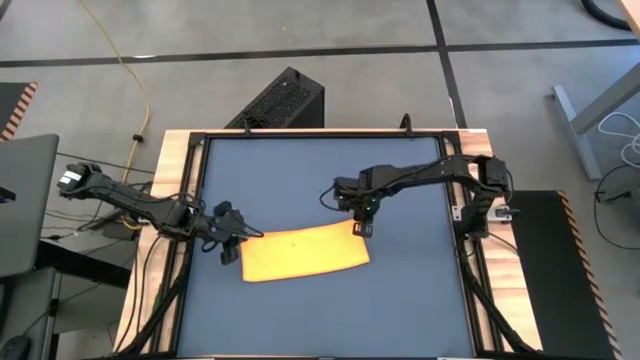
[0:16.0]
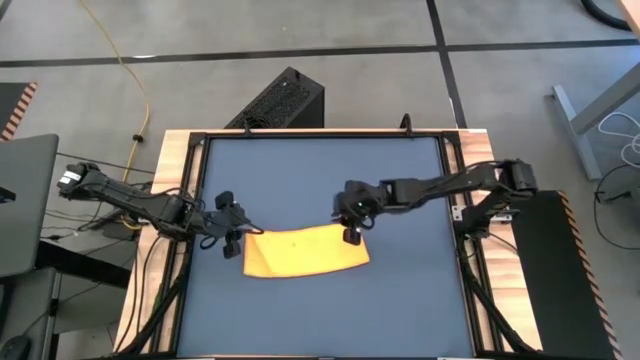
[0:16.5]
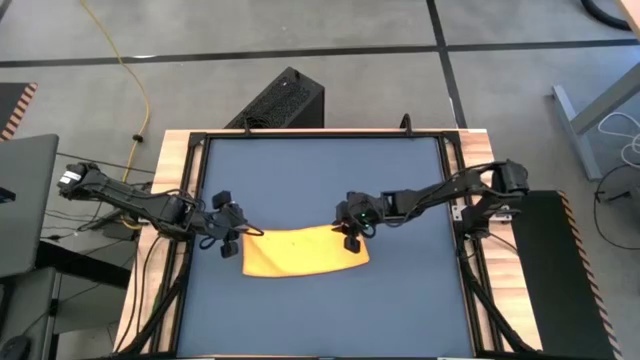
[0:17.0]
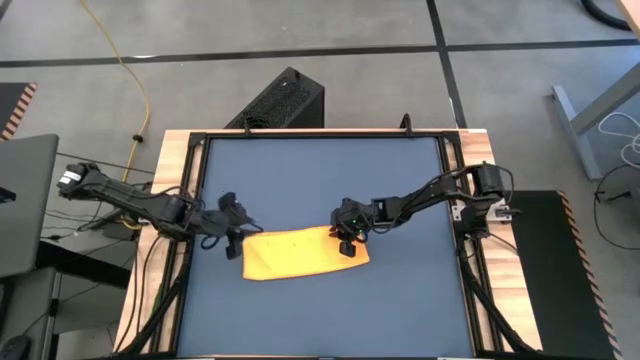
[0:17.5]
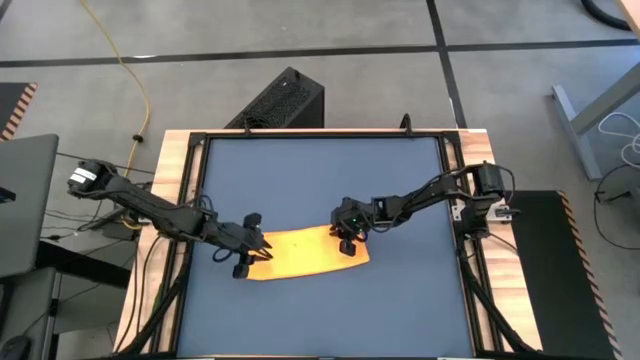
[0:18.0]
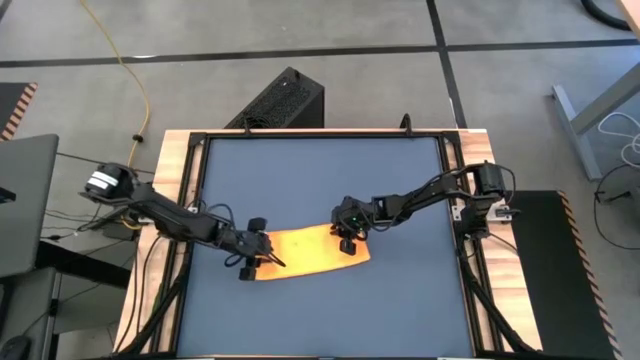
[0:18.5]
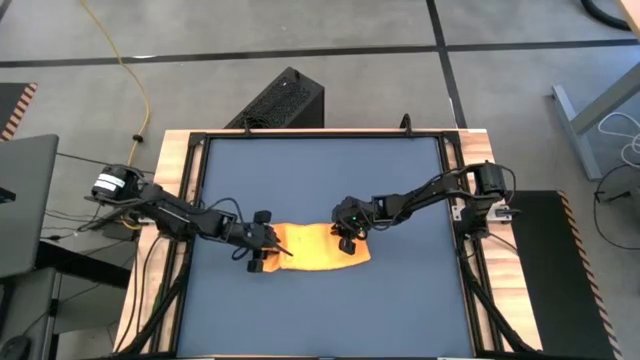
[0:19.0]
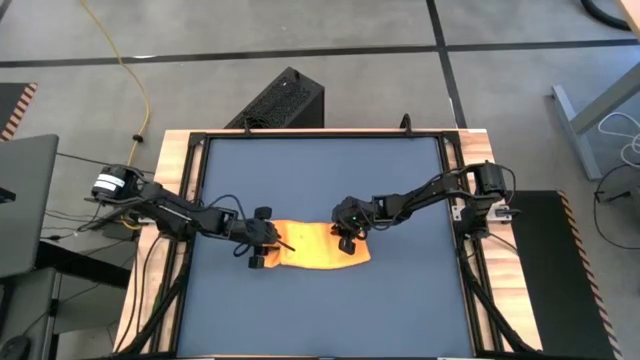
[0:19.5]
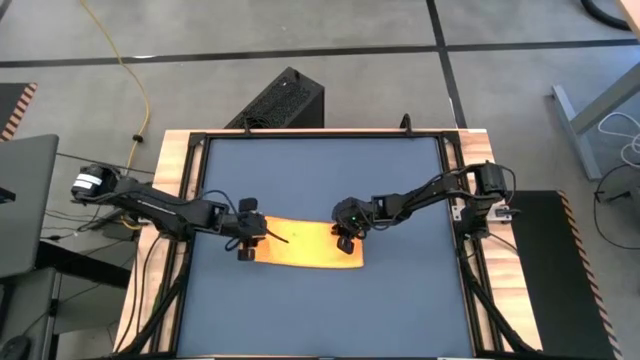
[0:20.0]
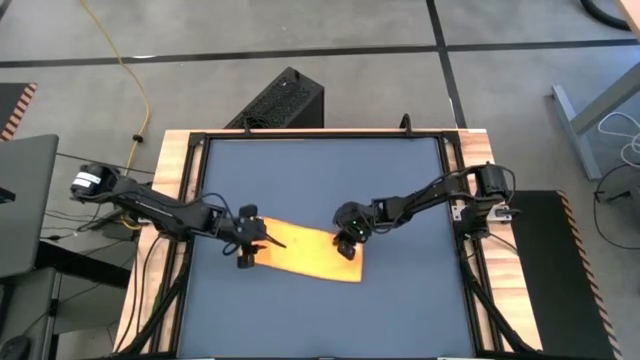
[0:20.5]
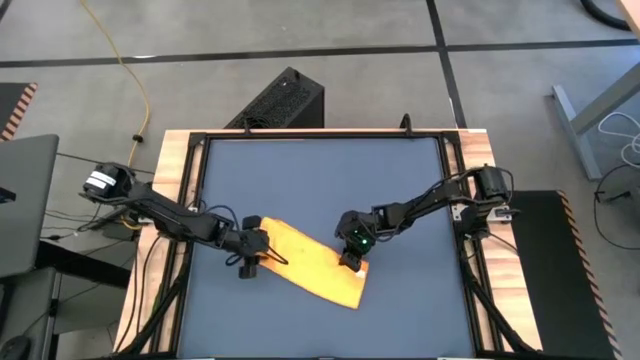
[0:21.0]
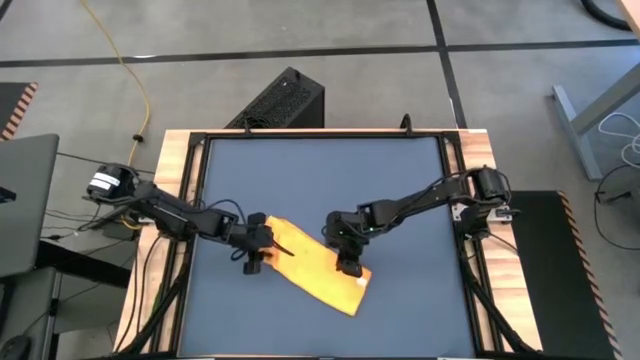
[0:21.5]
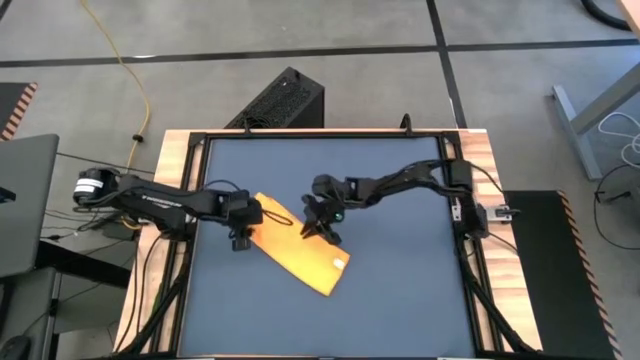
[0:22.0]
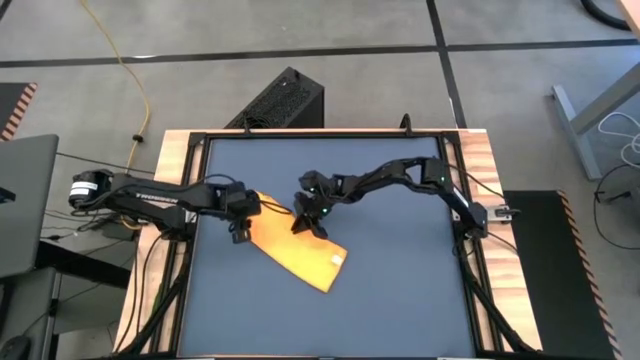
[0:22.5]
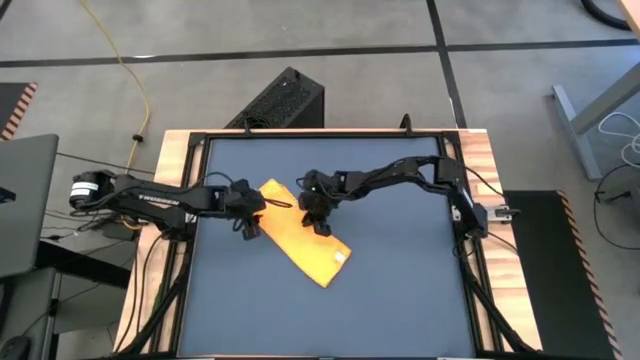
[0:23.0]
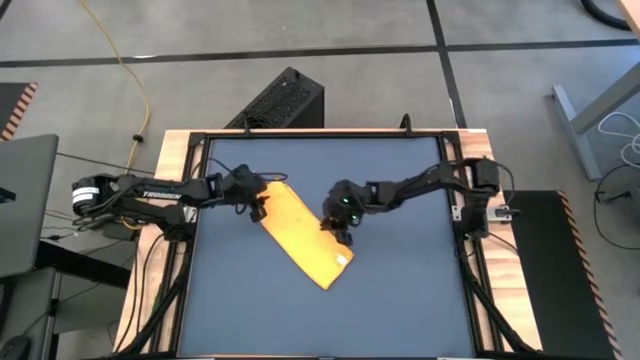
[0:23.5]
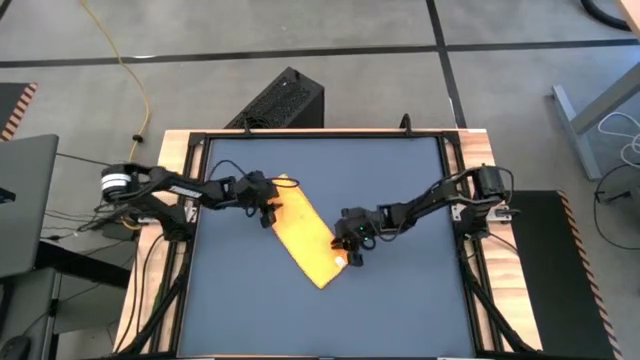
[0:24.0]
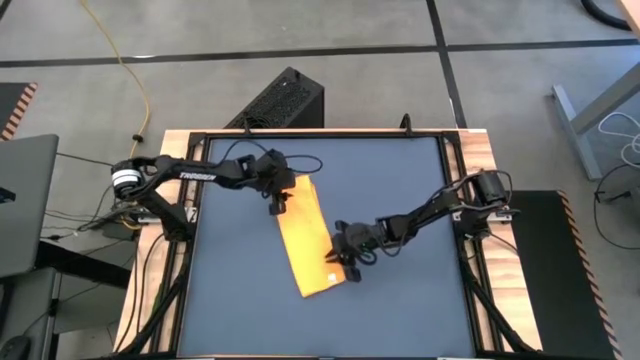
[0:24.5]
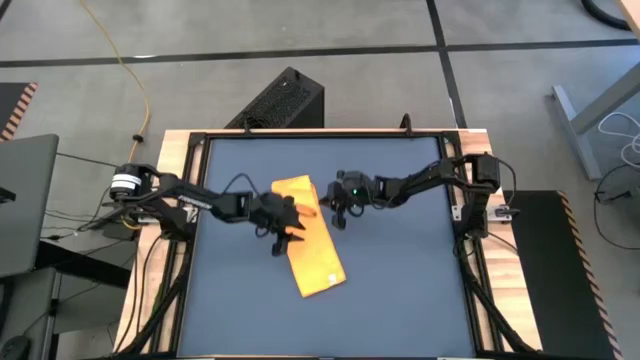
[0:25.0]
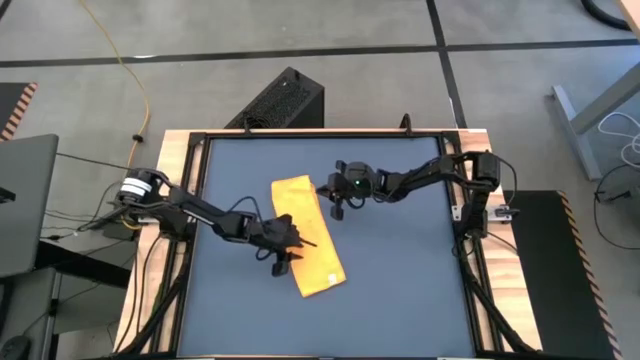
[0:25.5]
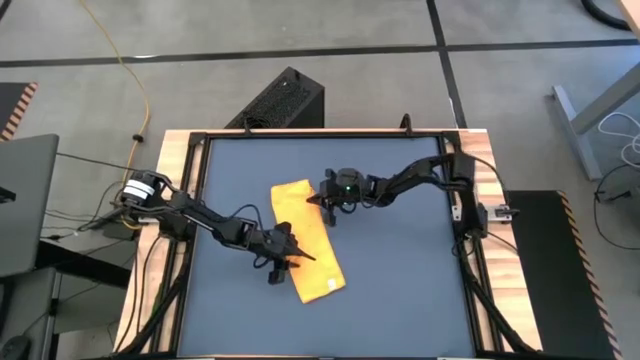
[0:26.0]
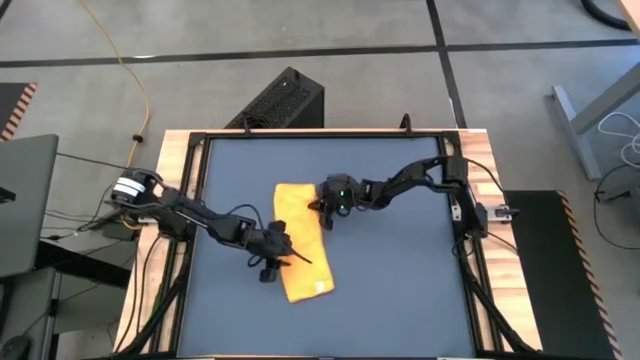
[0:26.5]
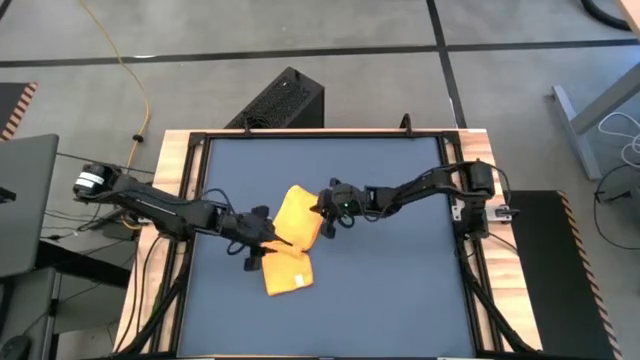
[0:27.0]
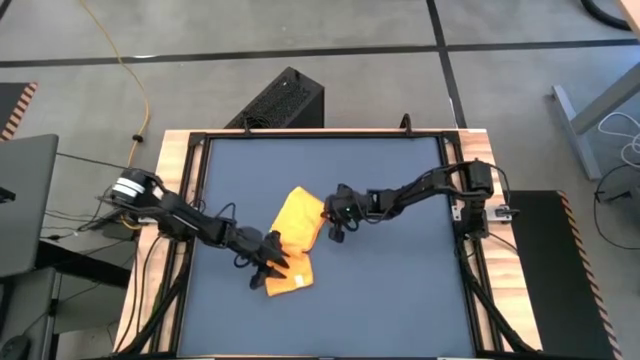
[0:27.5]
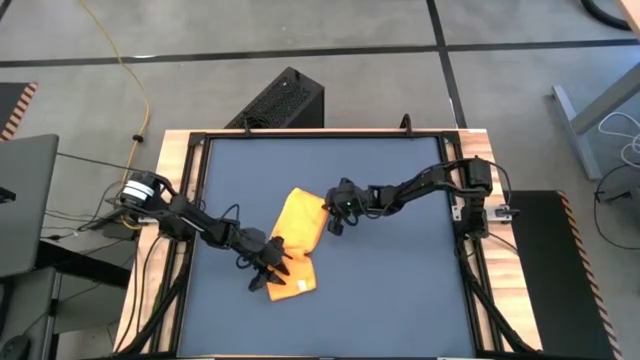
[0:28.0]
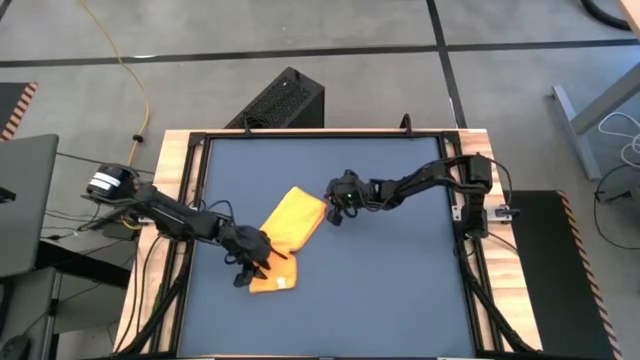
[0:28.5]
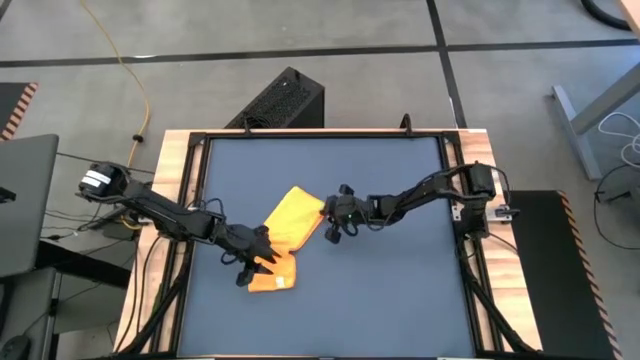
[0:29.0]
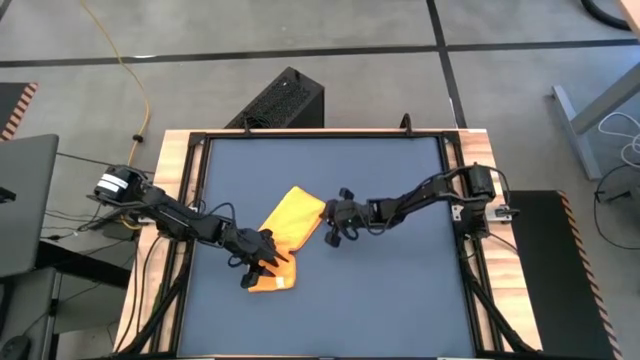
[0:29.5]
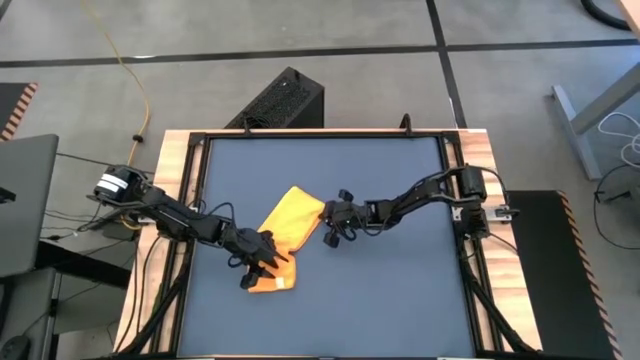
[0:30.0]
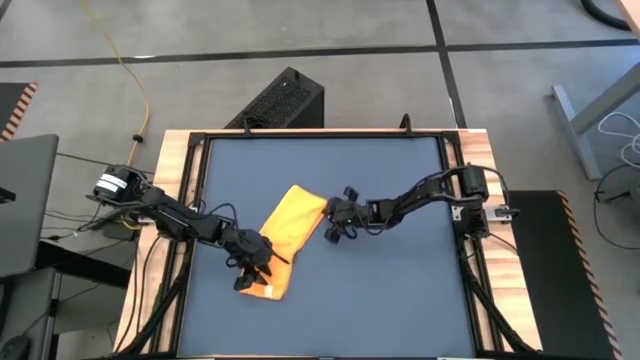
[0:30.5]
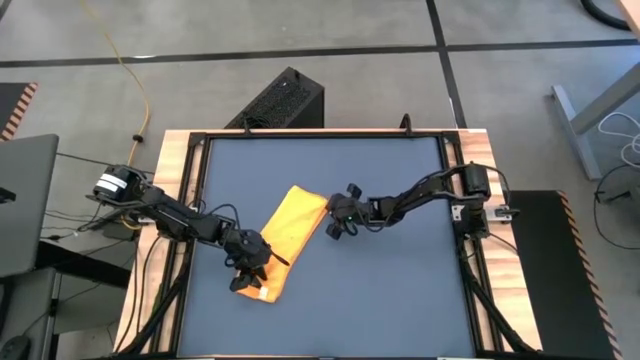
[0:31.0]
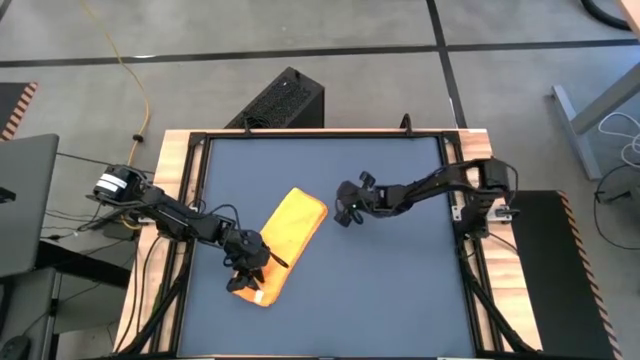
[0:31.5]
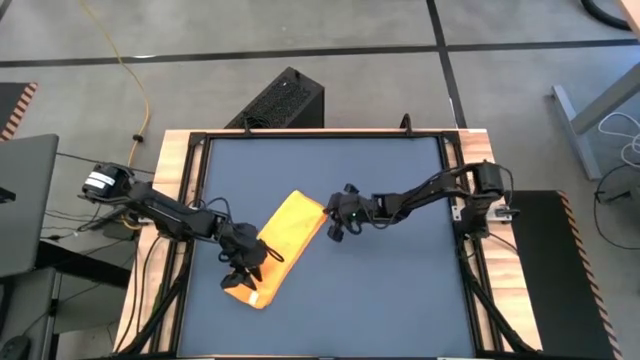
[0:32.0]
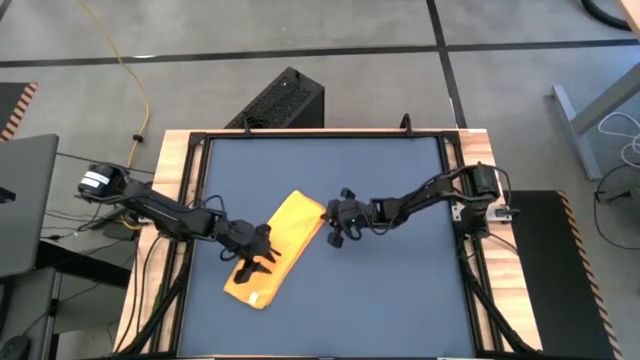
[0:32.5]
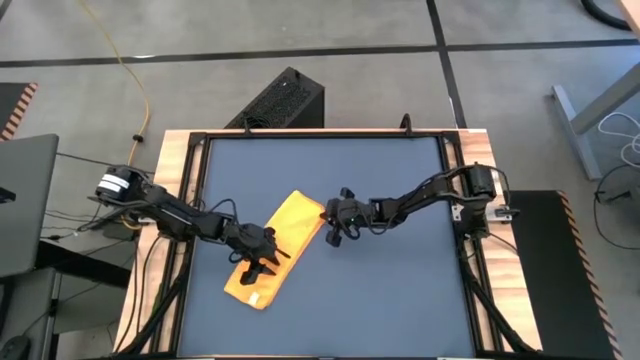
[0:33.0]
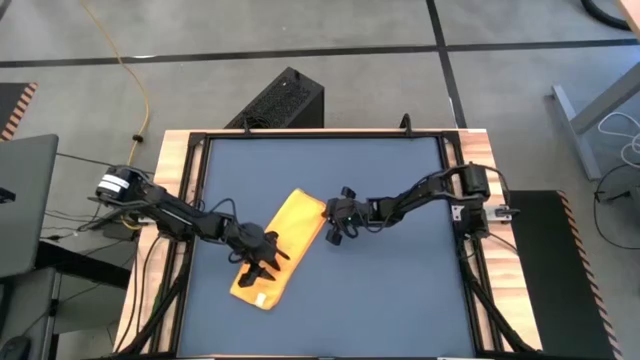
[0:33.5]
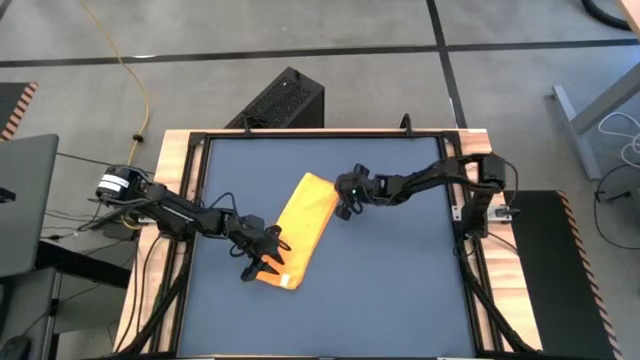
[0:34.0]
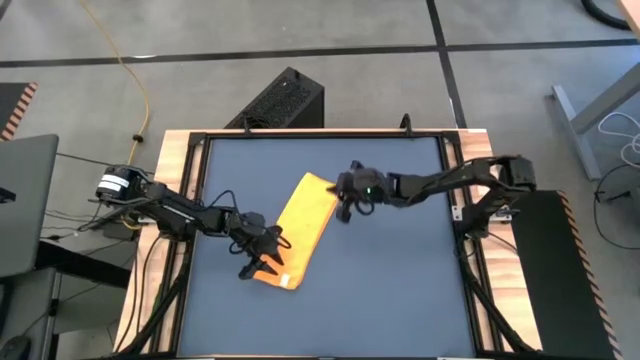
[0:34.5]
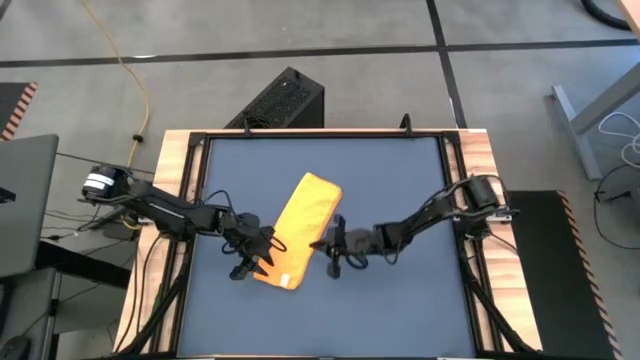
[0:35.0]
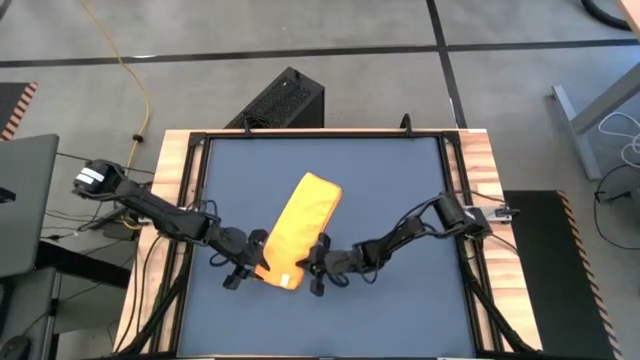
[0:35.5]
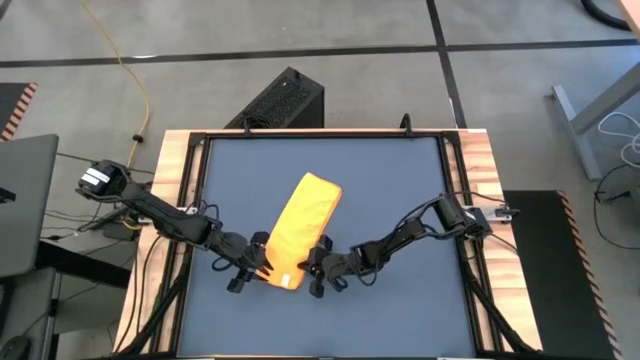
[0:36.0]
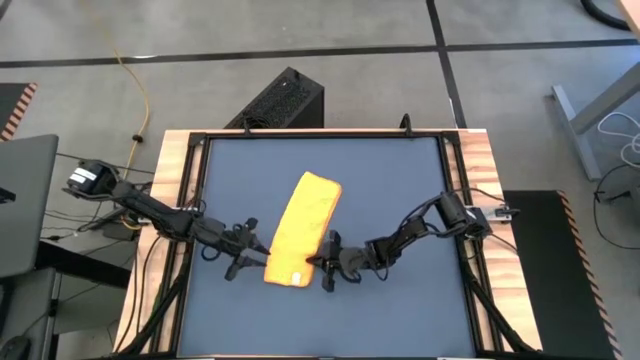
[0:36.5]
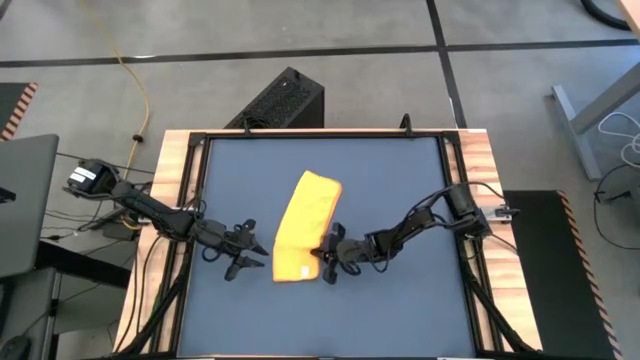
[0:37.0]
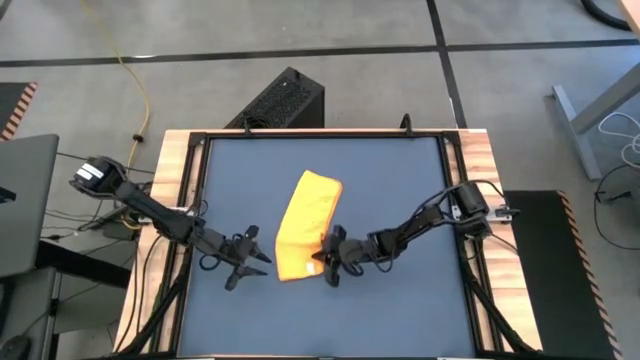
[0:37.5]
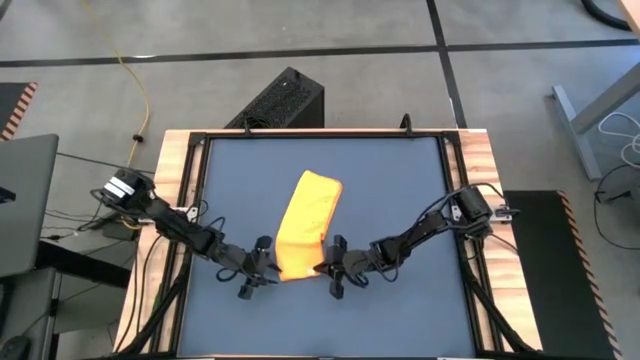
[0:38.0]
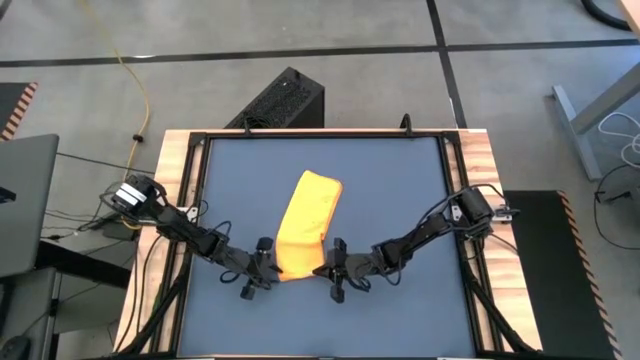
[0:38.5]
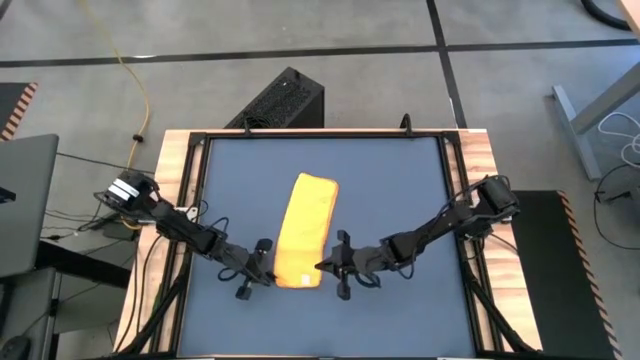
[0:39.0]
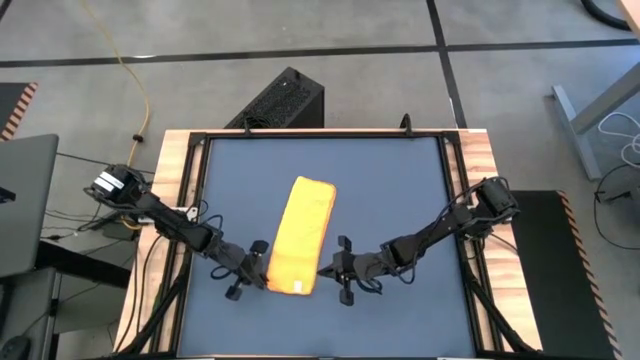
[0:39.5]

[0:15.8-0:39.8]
Task: Roll towel
Roll the orange microfiber towel
